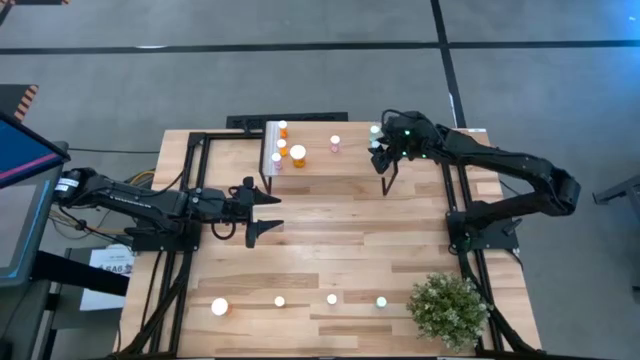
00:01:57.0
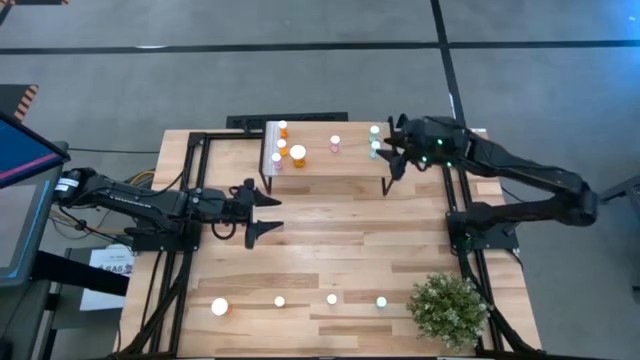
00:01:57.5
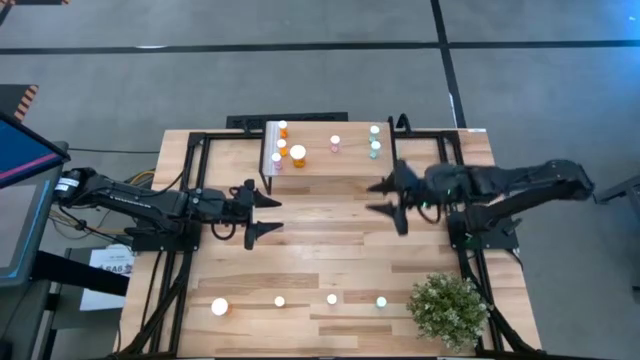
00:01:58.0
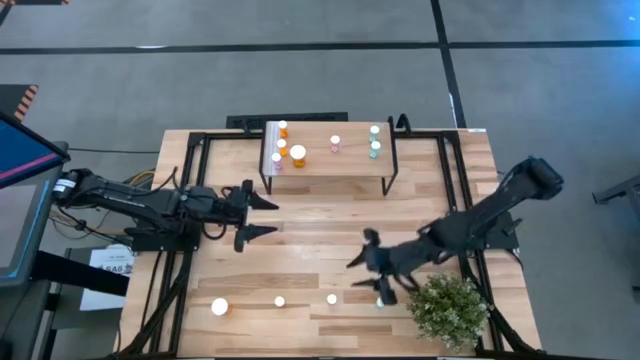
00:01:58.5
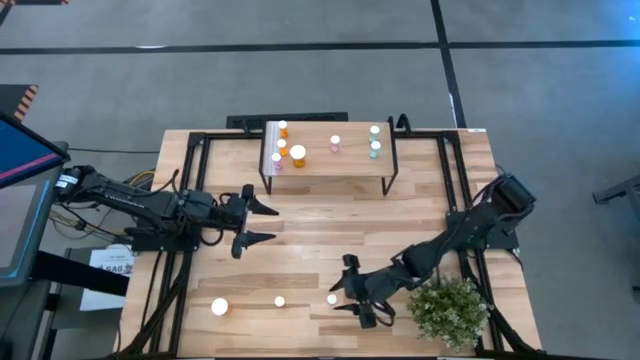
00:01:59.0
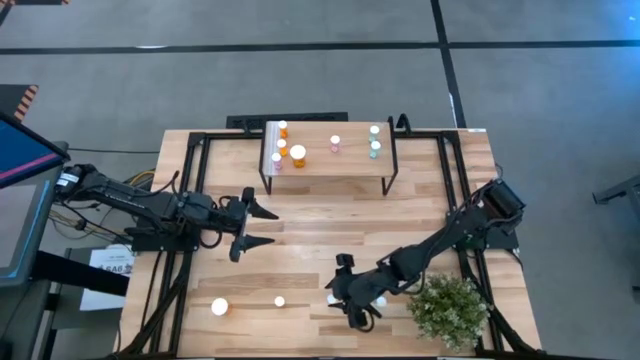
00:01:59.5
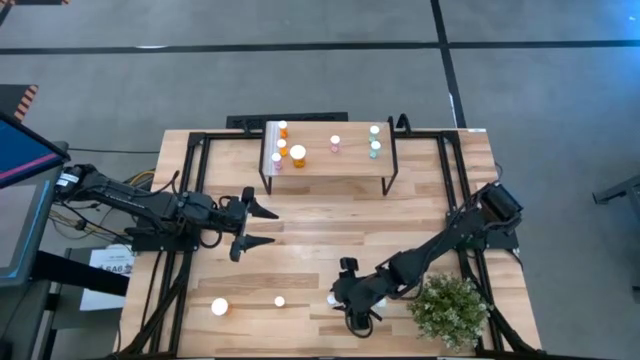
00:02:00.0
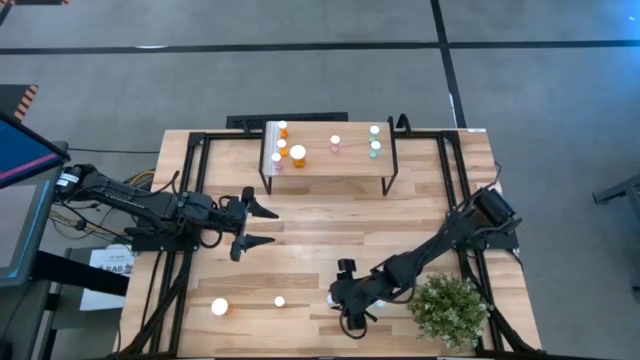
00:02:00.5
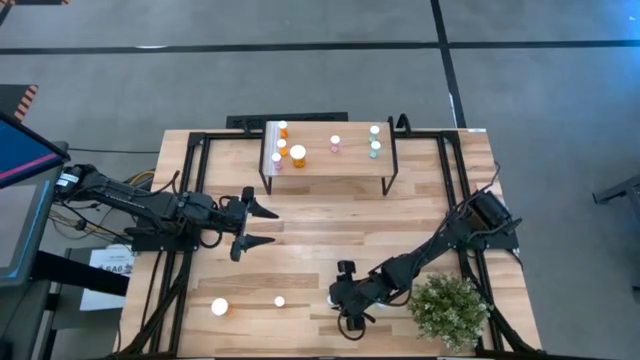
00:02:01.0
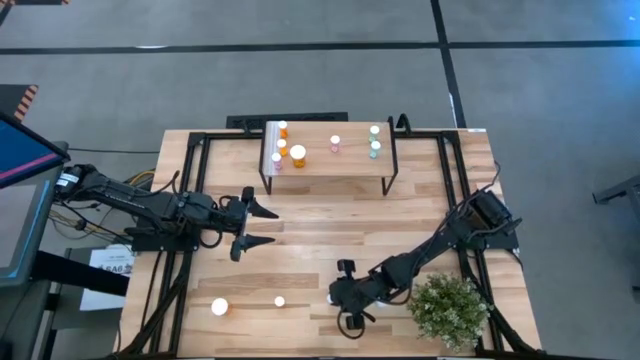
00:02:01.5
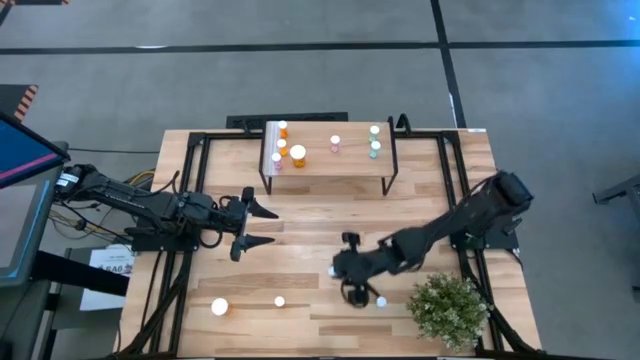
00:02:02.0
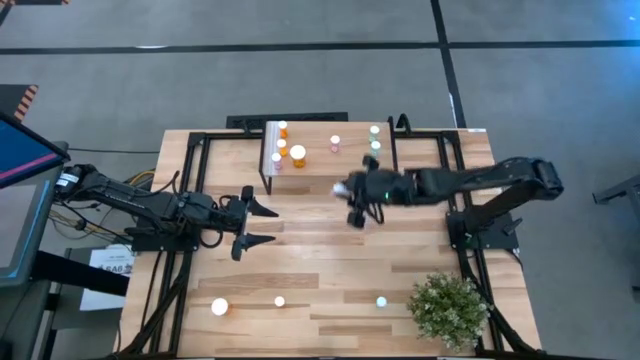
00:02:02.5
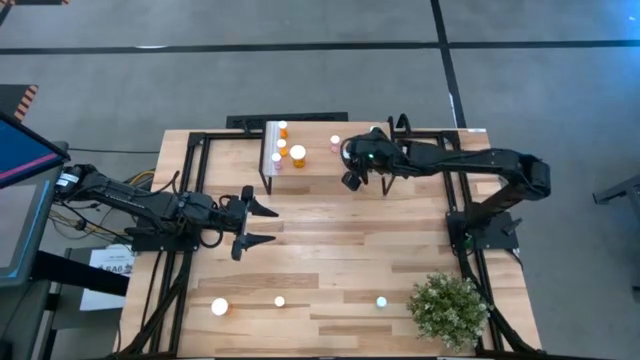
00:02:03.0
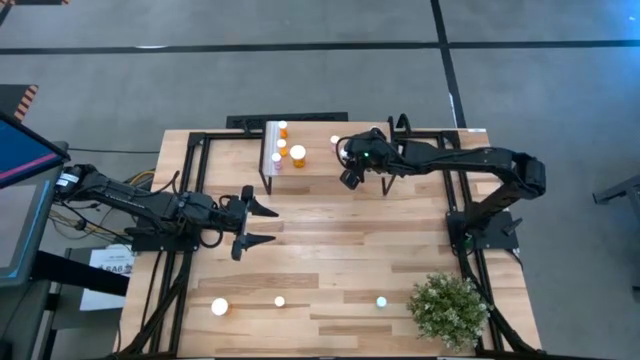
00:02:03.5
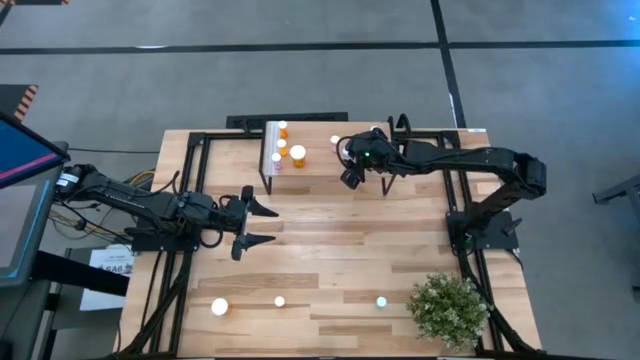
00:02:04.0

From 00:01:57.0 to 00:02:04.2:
Task: Pick and place medicine bottles onto shelf by color
Put the pink pill bottle on the shelf

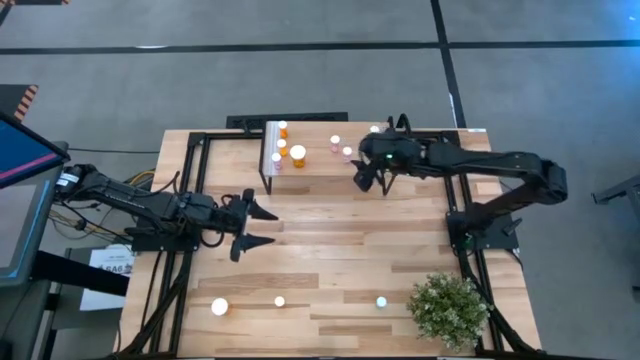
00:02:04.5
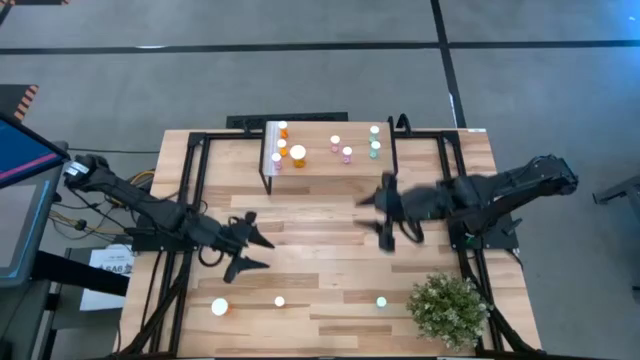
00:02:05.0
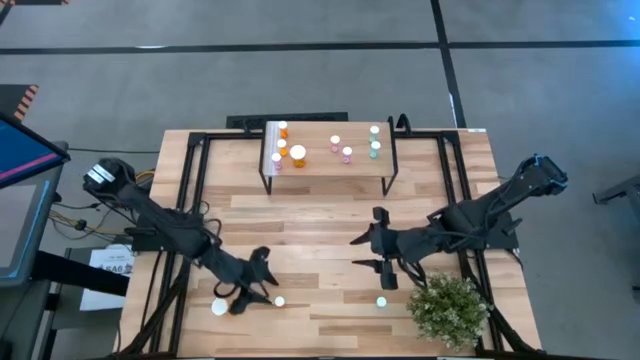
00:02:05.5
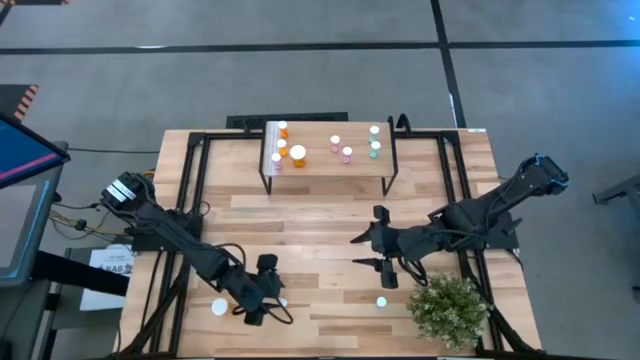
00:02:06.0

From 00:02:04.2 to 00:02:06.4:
Put the small orange pill bottle on the shelf

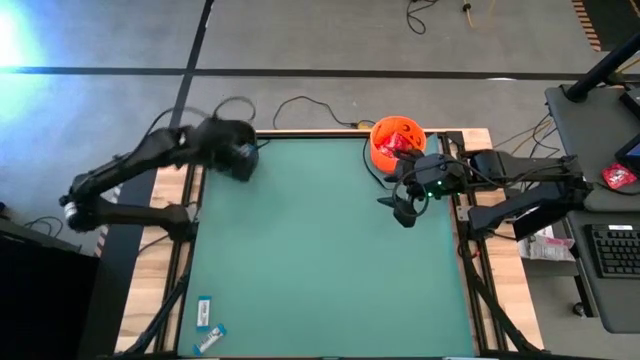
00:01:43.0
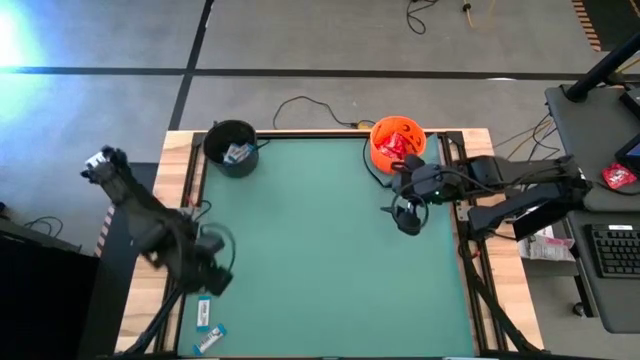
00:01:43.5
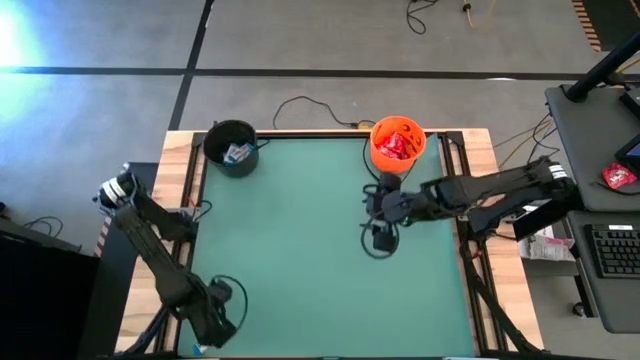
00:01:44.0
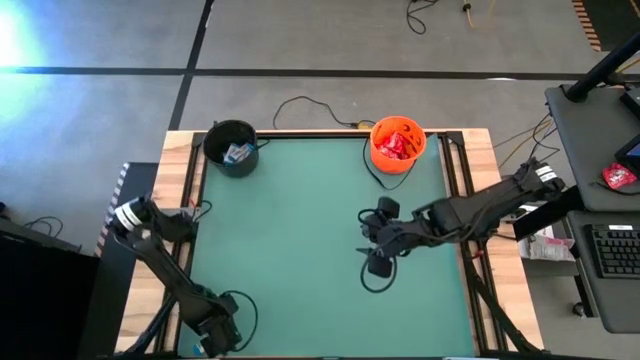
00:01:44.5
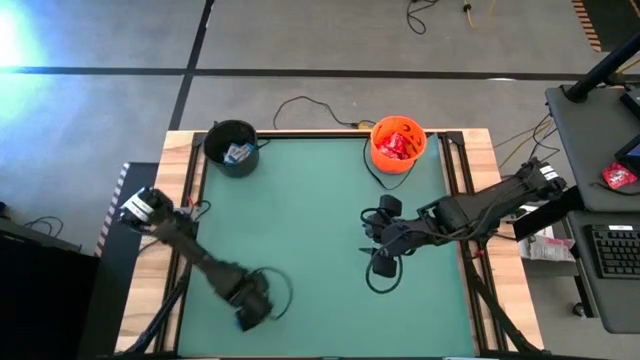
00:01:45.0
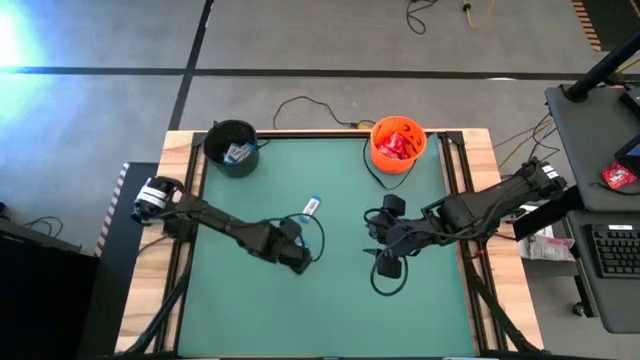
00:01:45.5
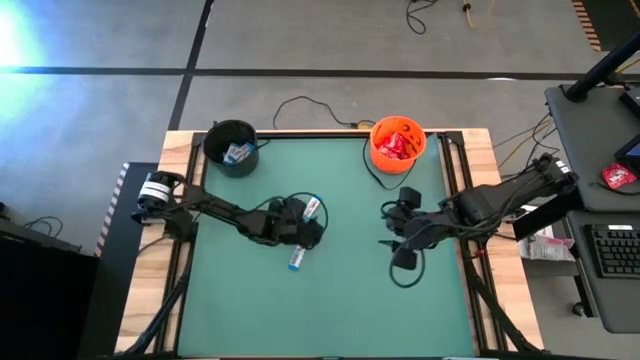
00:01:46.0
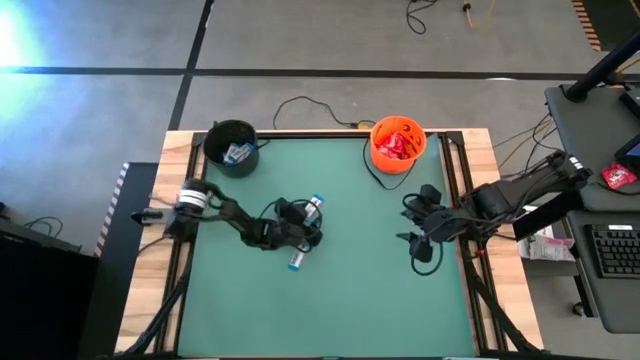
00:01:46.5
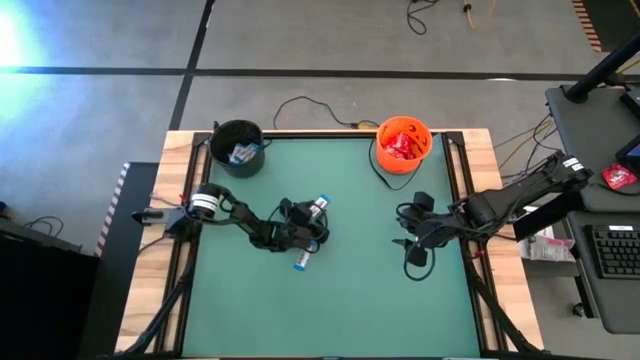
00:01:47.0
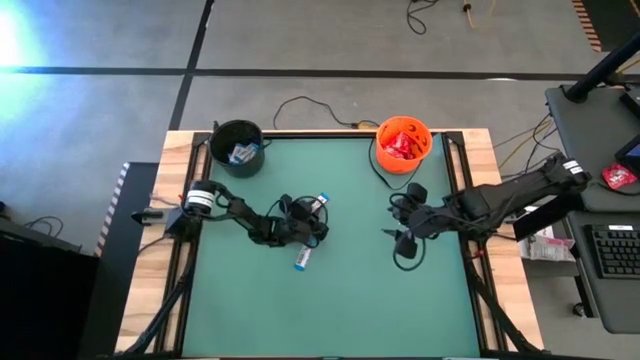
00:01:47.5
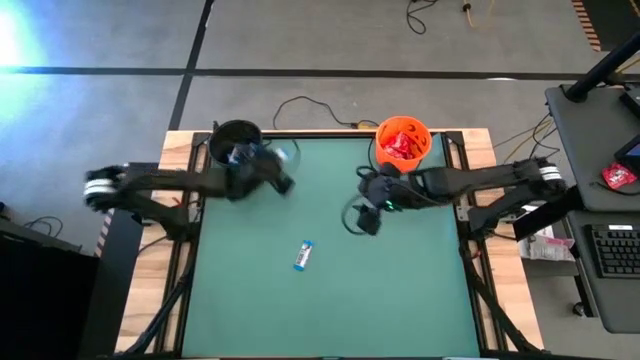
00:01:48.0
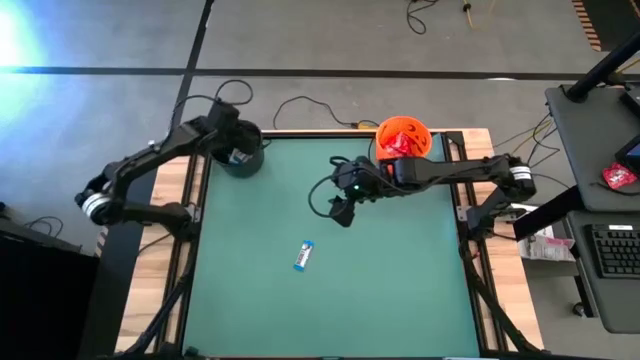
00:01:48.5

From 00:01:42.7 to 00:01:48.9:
Task: Sort candy by brand, put in halloween buckets
Put the white candy into the black bucket

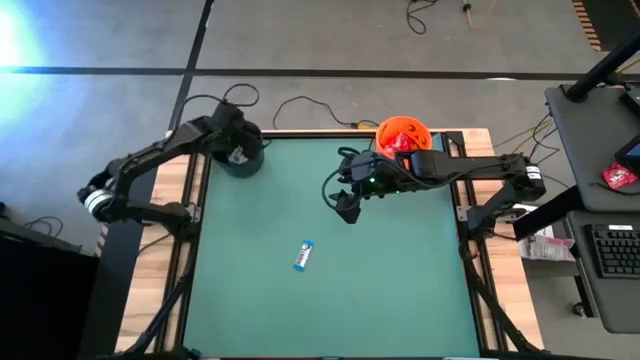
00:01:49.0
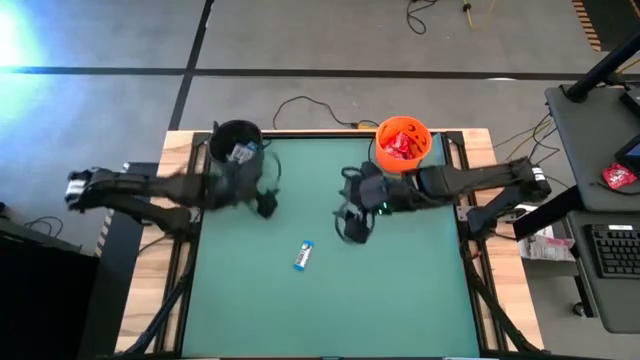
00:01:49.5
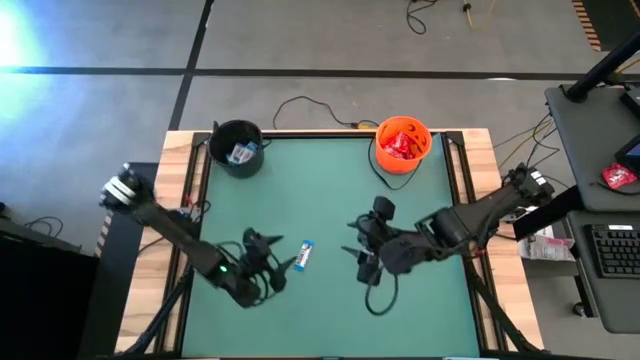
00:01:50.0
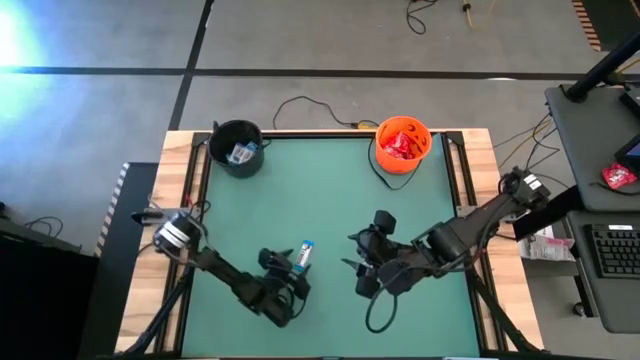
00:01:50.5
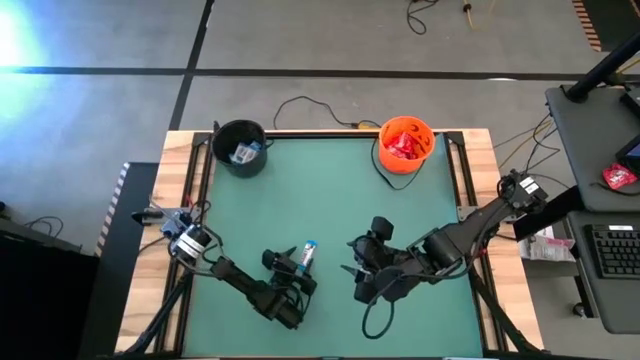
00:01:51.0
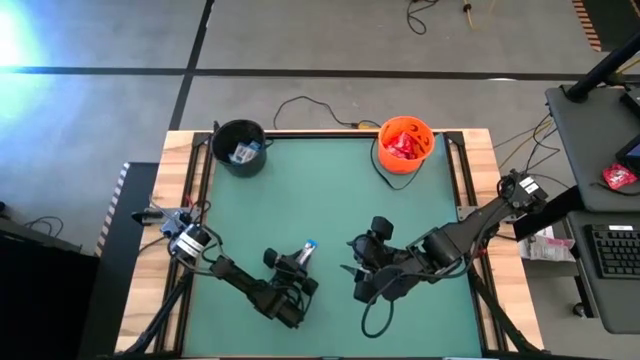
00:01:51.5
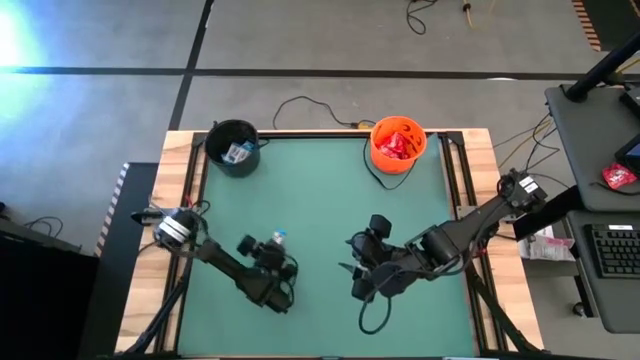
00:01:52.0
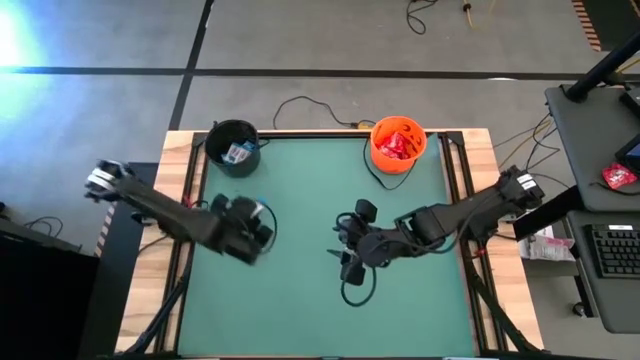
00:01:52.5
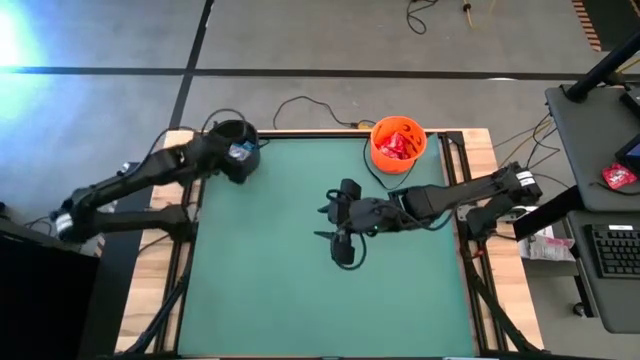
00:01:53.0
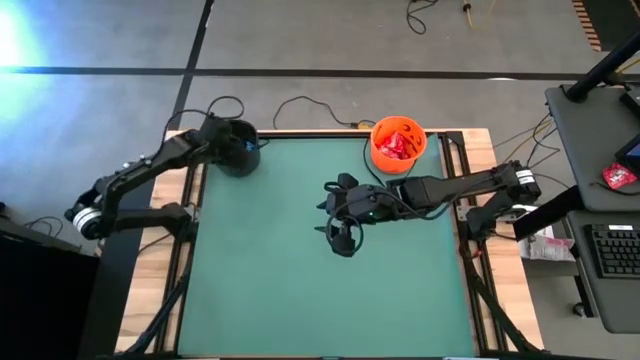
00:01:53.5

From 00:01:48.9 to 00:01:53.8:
Put the white candy into the black bucket
